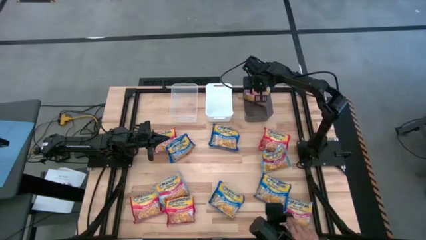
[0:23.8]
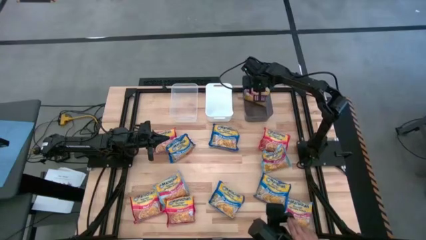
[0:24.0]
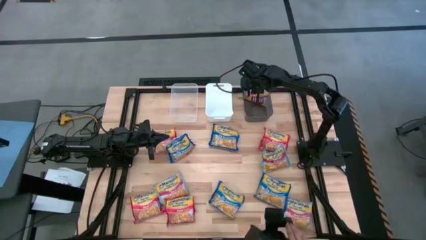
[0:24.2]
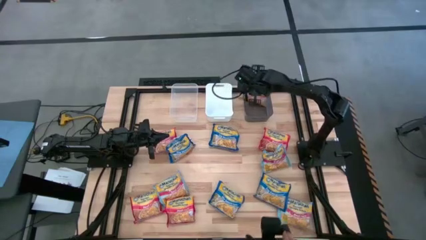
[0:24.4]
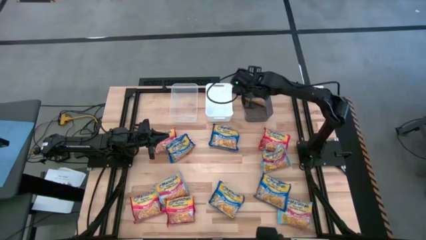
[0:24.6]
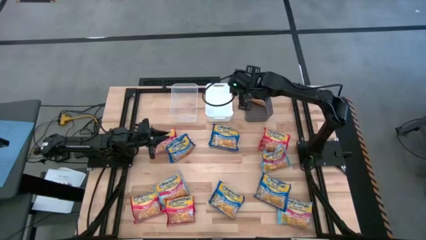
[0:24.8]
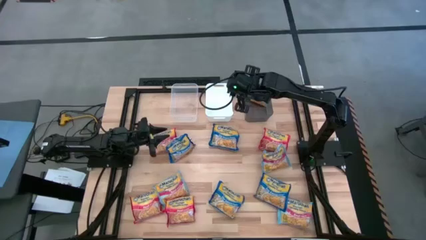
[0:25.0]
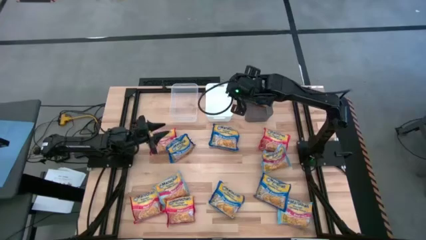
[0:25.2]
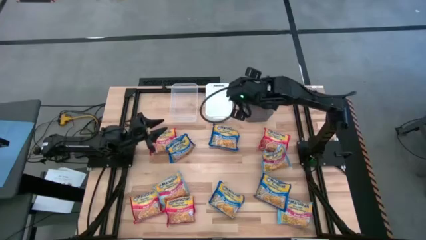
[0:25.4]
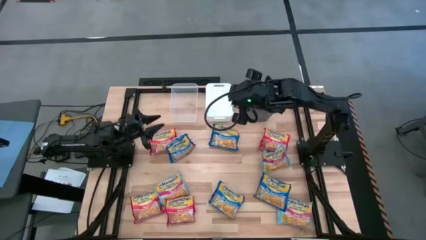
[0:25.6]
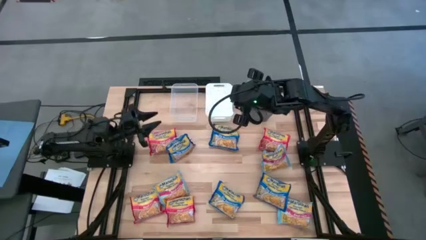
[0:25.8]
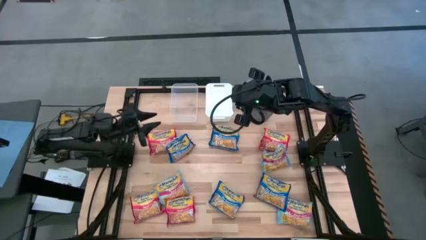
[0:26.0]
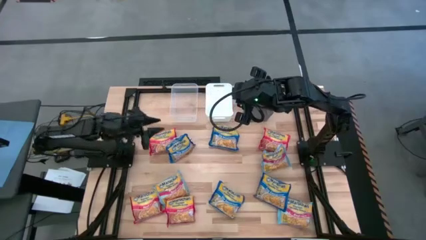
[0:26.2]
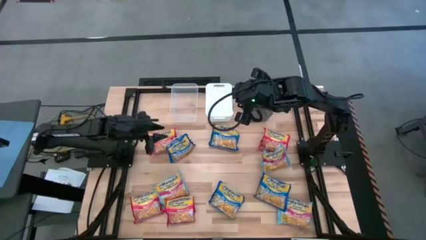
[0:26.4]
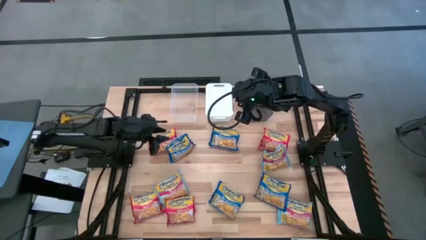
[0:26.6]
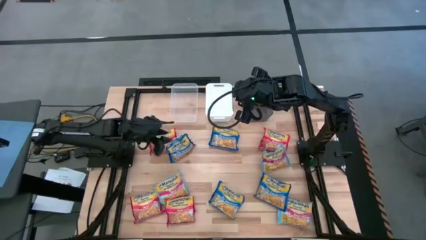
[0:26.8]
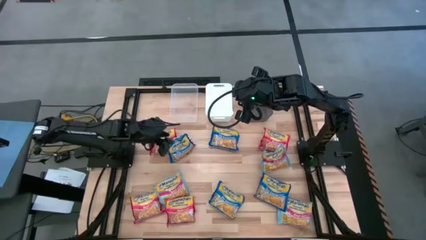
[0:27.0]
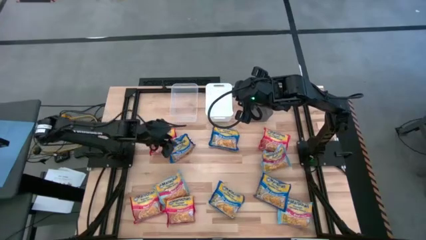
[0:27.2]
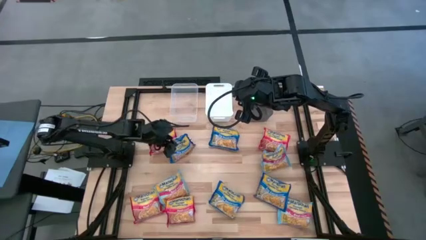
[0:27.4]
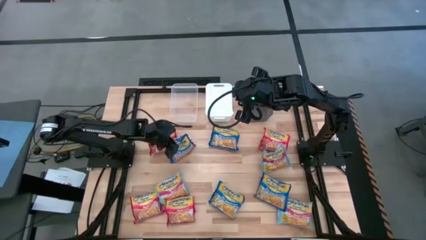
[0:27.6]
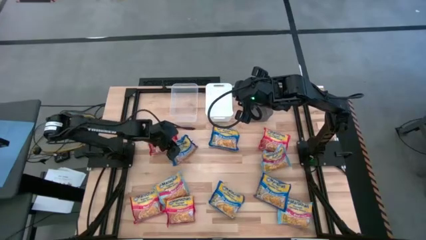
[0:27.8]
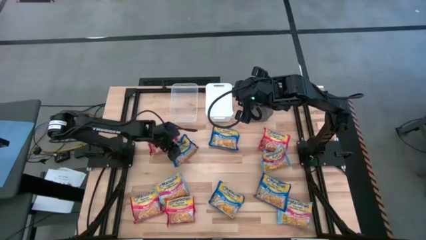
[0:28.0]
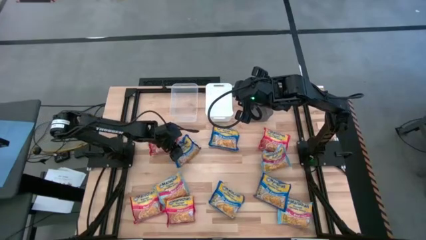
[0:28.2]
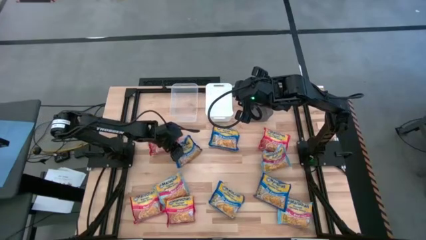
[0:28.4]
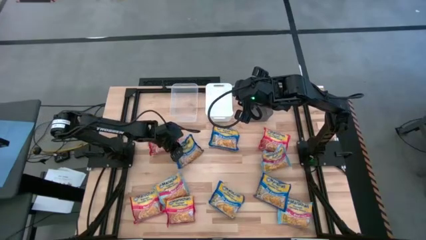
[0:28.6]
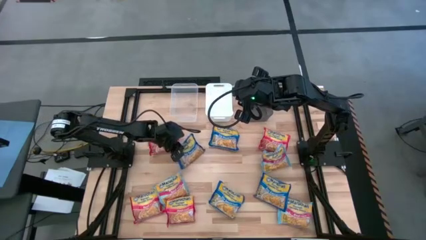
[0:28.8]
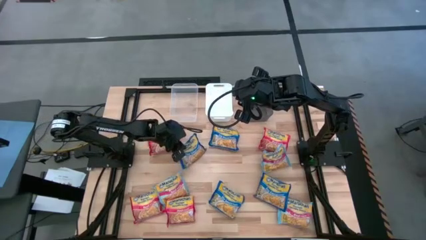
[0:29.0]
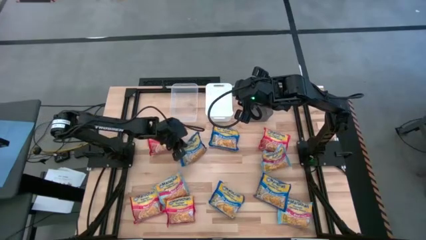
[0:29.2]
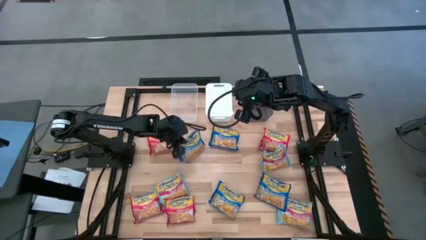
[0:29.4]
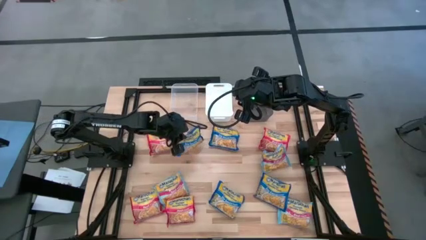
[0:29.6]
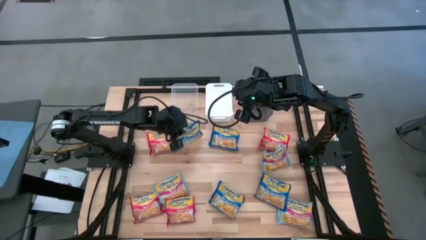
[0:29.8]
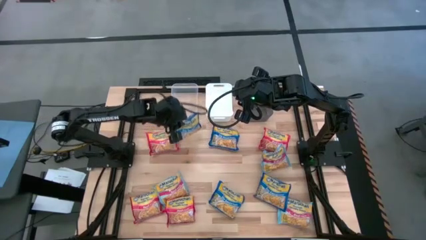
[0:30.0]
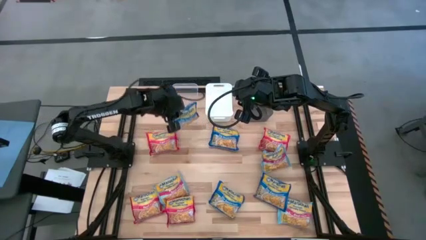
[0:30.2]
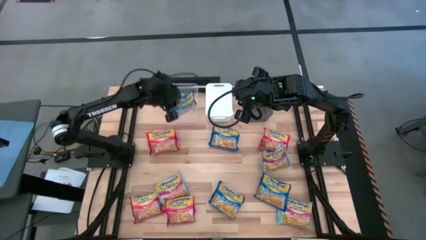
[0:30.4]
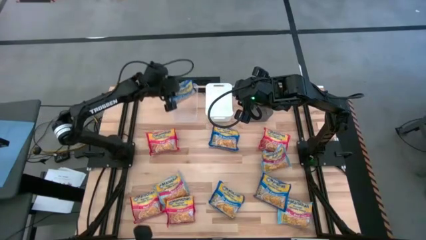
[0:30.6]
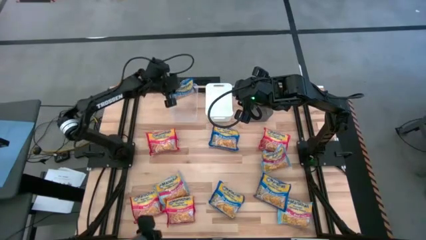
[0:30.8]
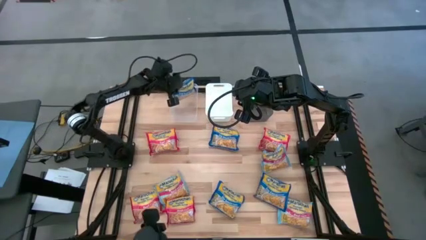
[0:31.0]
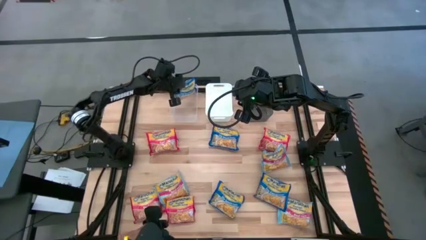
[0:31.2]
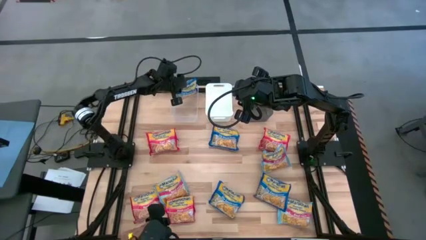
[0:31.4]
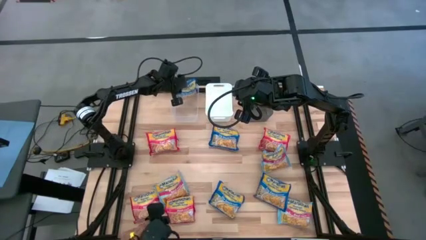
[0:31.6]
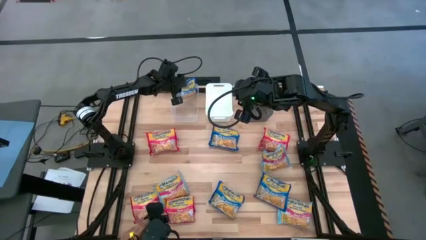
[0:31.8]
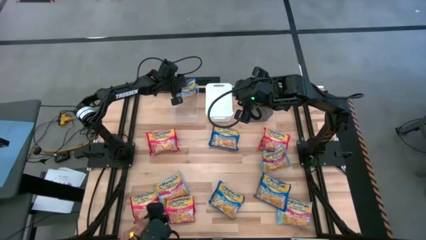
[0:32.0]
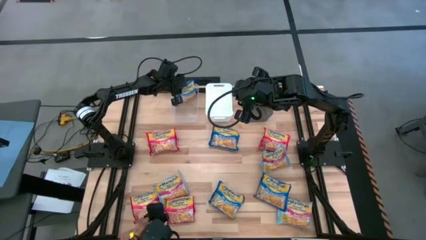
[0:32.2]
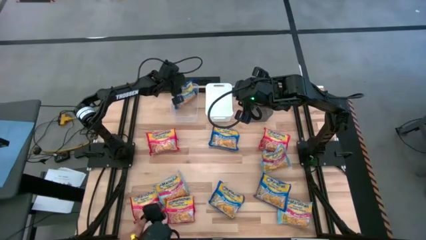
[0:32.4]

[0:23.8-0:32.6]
Task: Sort Maruchan noodles
Put the blue noodle pack into the transparent bin

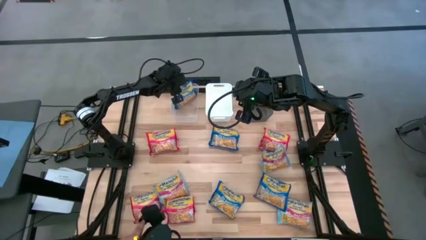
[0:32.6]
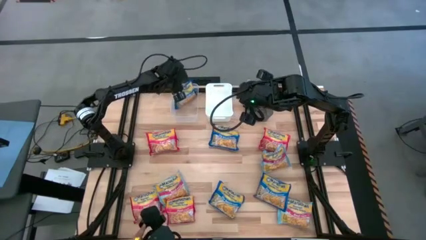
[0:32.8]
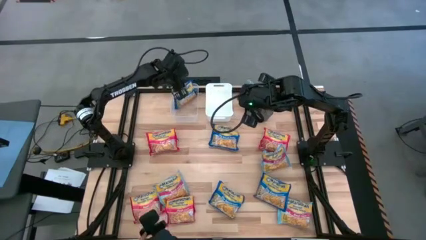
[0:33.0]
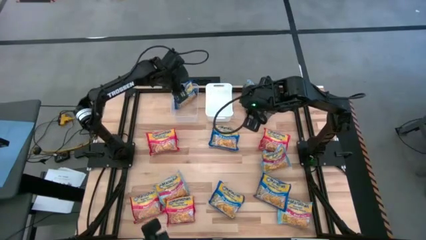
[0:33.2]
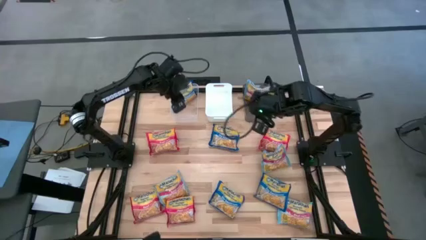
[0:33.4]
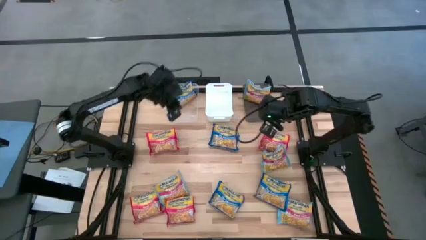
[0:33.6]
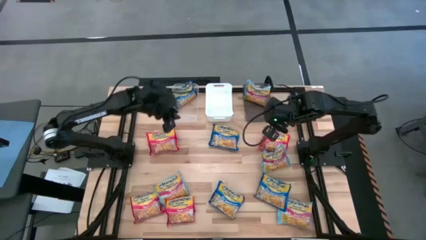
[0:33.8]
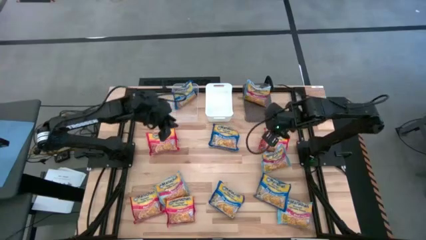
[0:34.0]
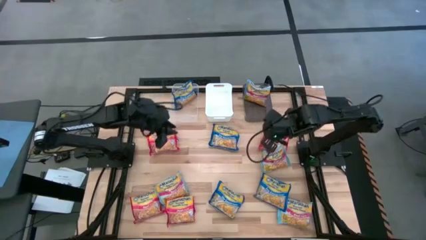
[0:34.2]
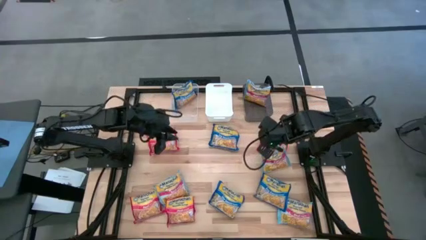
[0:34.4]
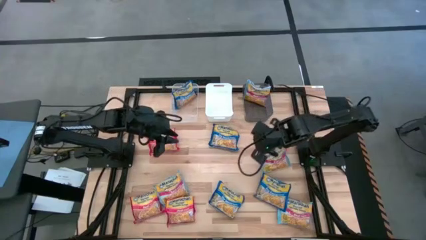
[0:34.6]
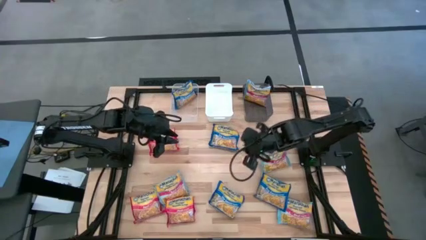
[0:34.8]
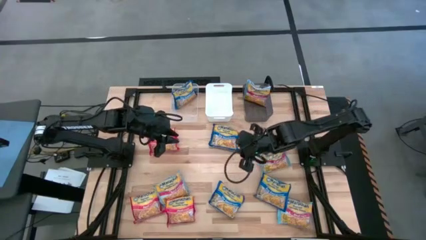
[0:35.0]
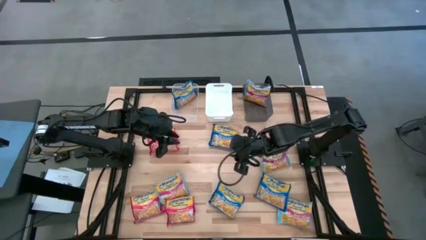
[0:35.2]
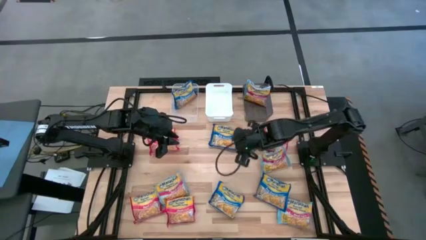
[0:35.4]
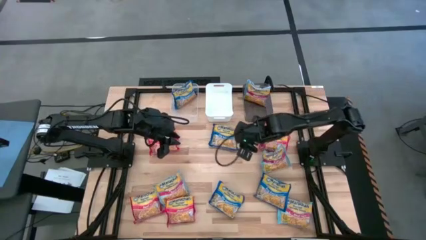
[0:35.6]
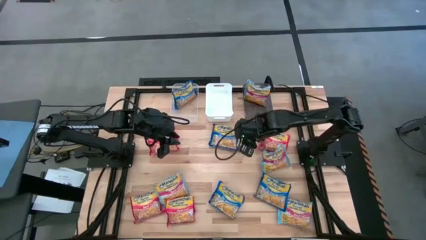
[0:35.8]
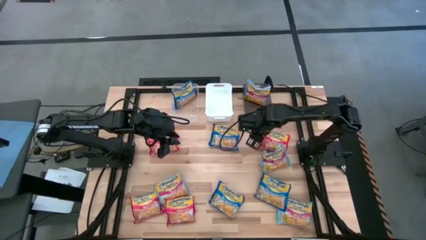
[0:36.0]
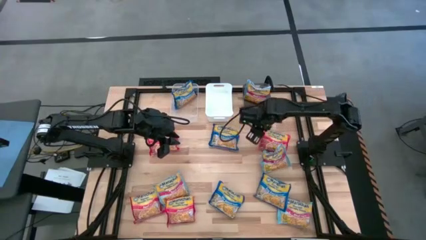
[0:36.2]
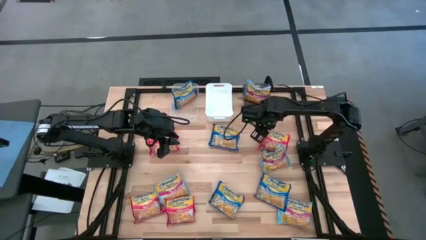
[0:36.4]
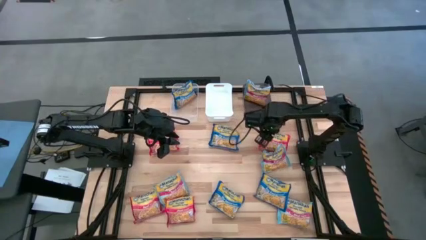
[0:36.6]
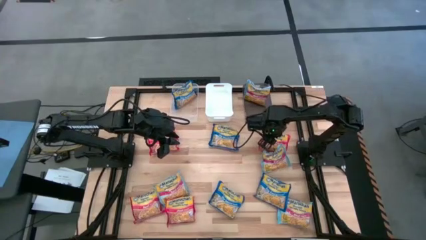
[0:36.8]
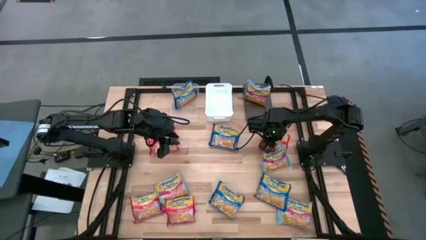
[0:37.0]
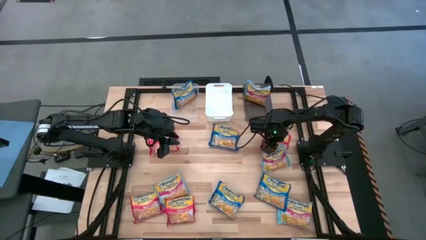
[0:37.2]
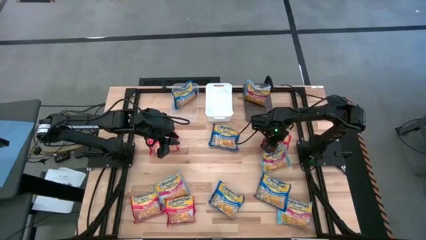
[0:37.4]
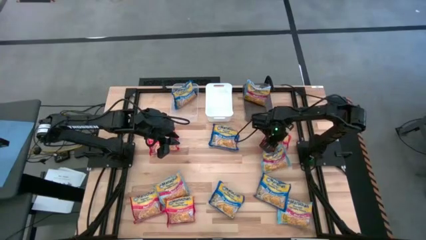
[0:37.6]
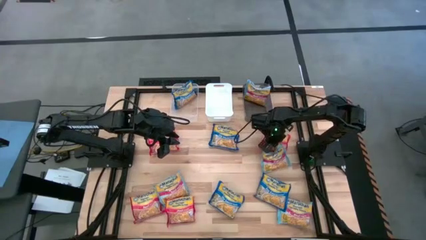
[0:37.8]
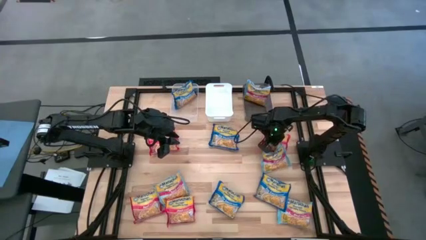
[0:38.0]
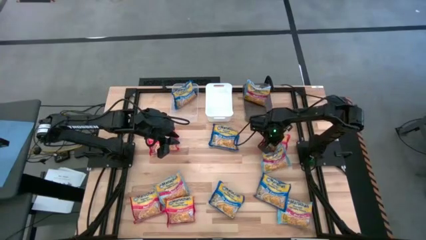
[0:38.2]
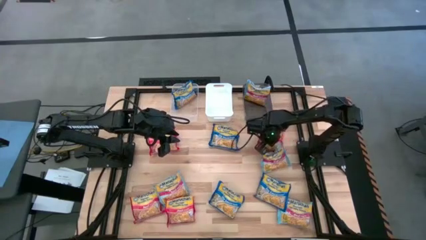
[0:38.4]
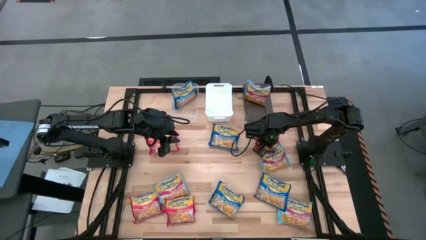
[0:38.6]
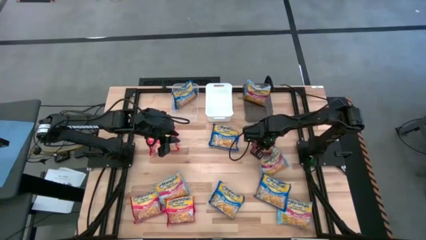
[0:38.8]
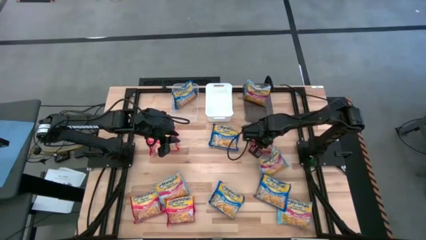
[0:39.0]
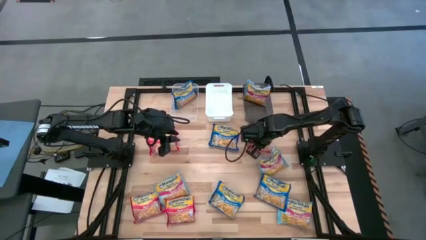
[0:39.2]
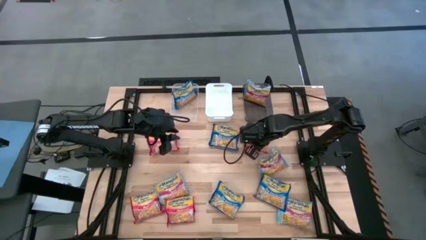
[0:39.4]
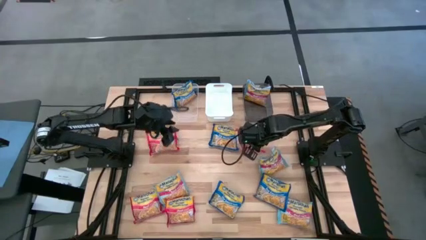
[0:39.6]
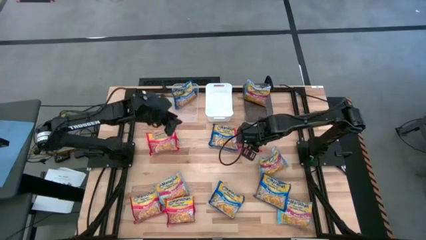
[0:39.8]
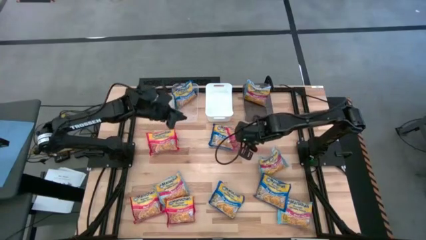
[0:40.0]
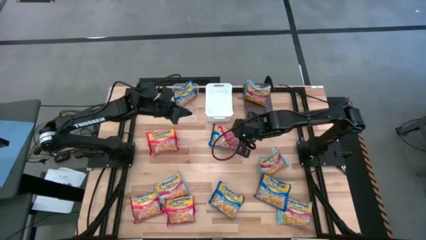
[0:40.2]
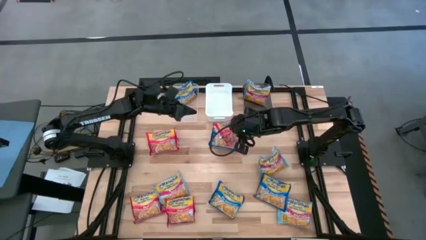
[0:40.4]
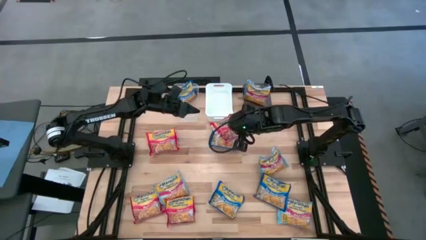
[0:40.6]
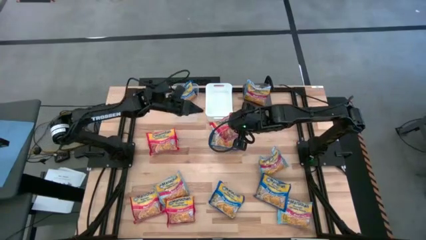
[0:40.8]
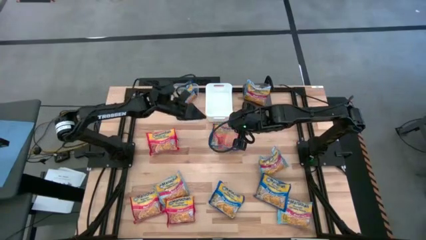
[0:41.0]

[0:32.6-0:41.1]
Put the red noodle pack into the white bin
